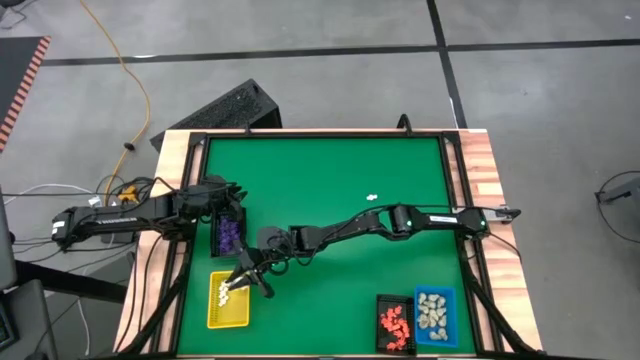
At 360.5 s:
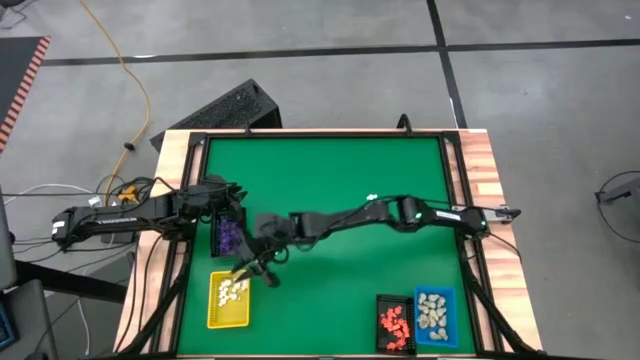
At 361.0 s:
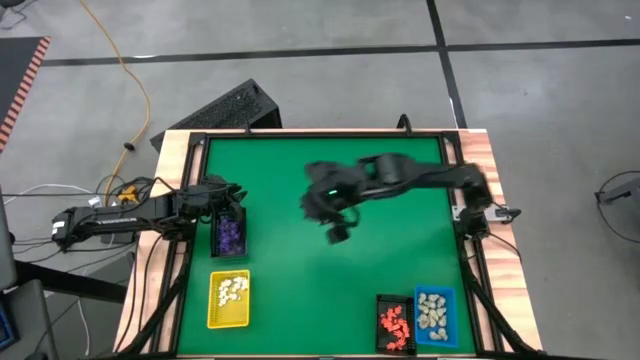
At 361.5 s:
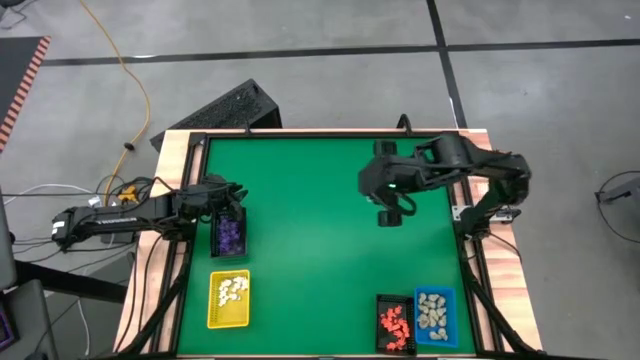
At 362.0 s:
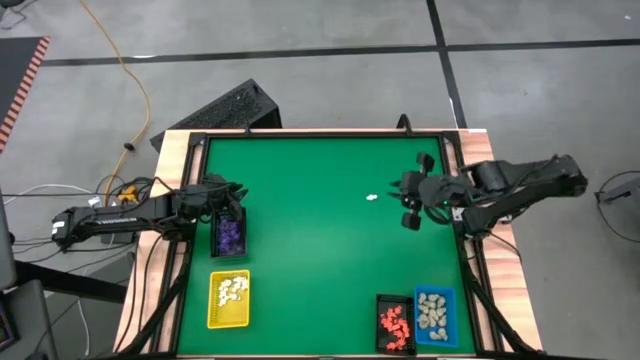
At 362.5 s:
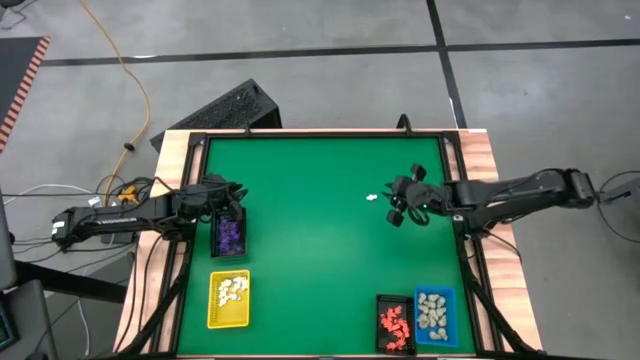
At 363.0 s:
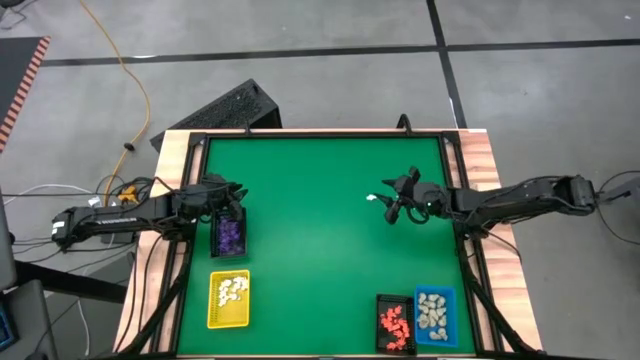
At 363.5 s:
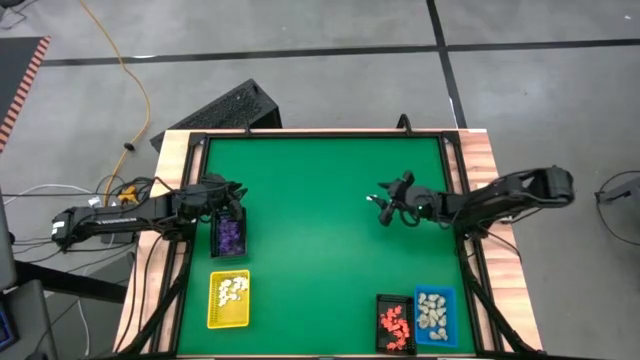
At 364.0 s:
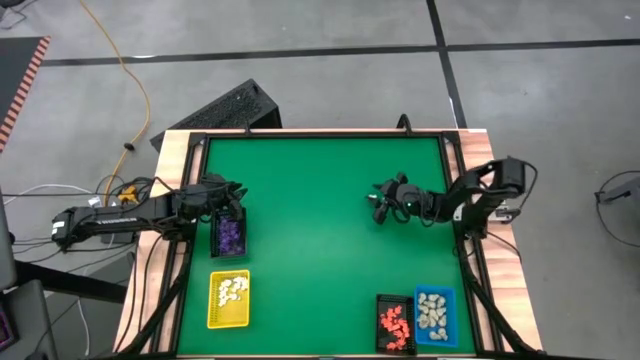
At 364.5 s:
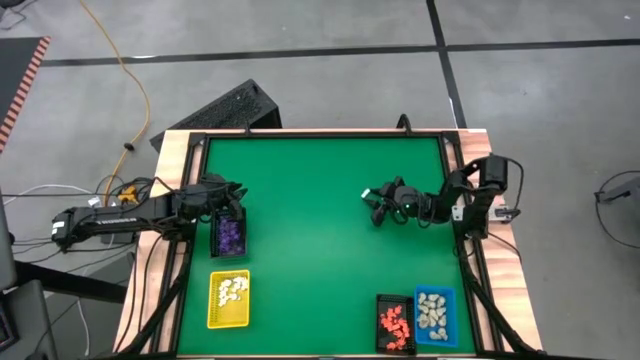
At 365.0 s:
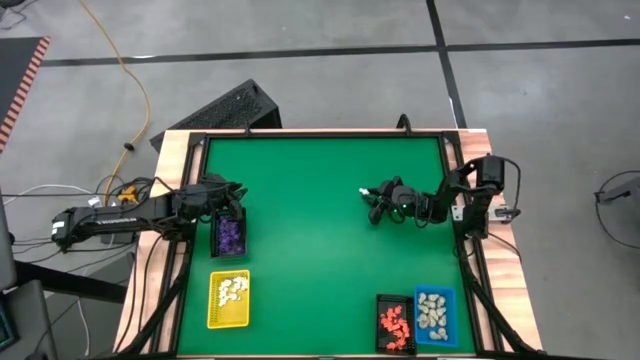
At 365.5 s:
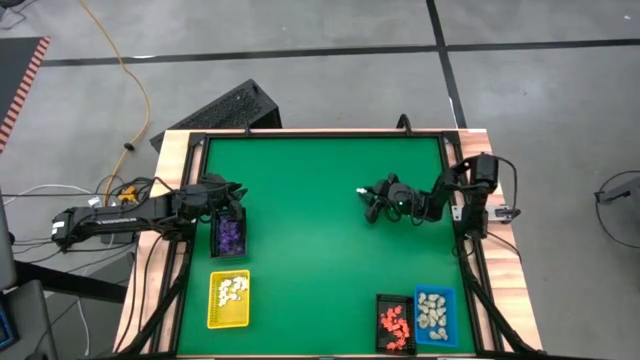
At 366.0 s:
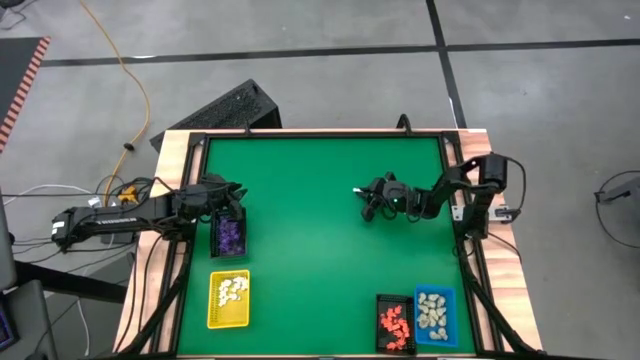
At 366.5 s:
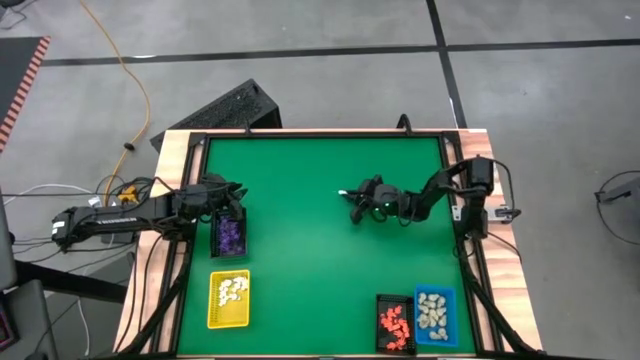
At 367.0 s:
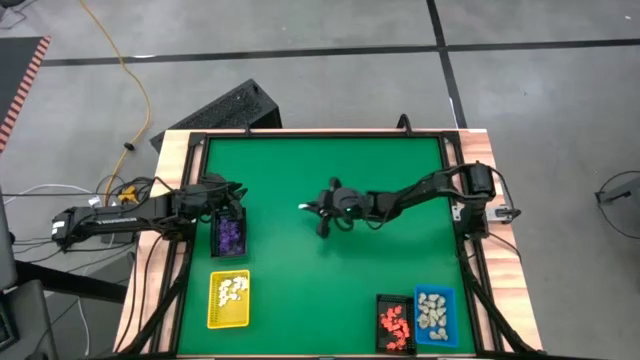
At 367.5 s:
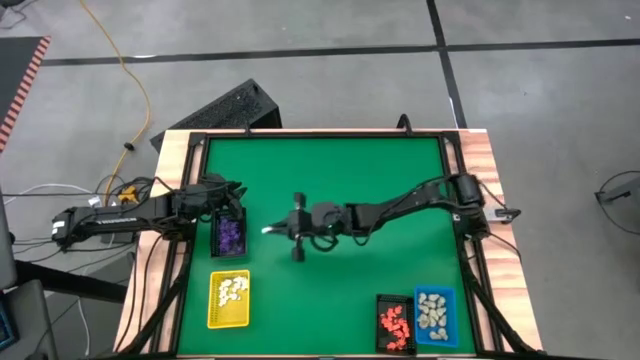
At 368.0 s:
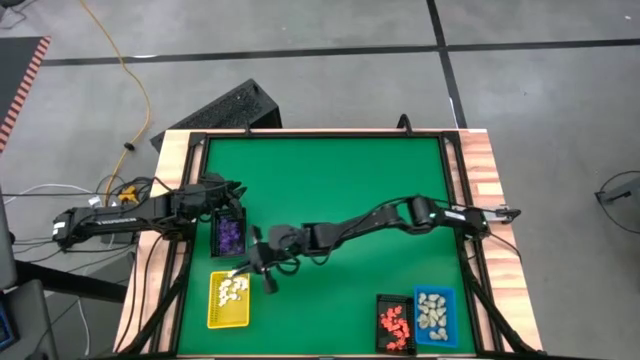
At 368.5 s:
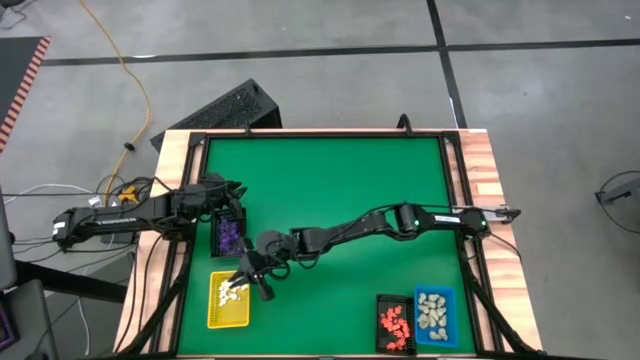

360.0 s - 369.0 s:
Task: Sort Halloween decoration
Put the white skeleton toy into the yellow basket

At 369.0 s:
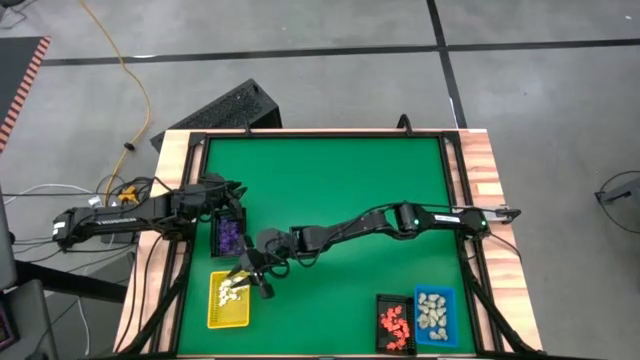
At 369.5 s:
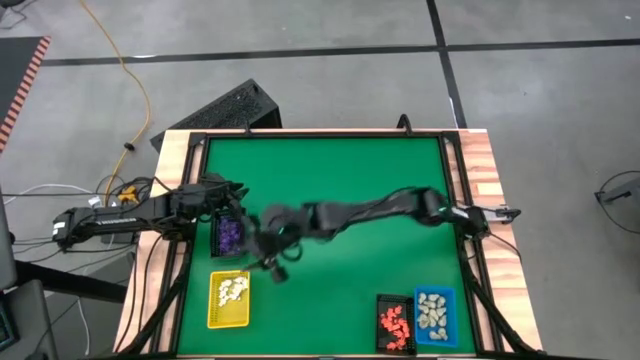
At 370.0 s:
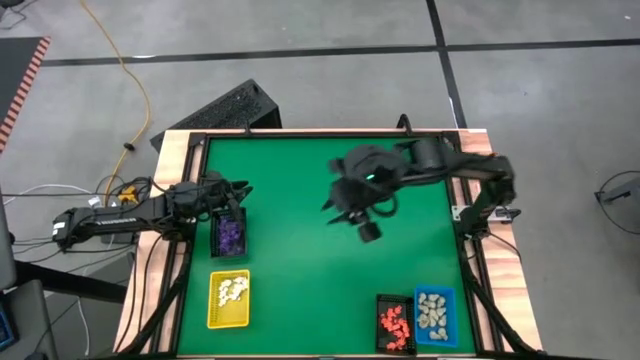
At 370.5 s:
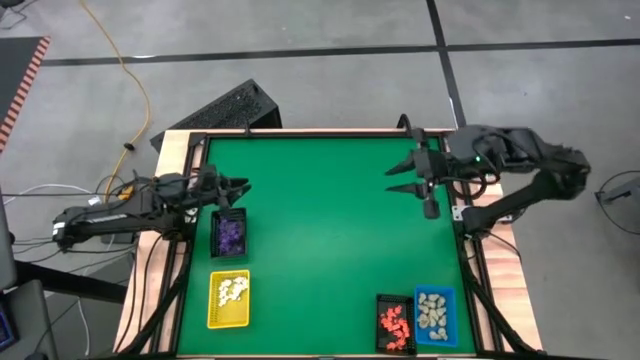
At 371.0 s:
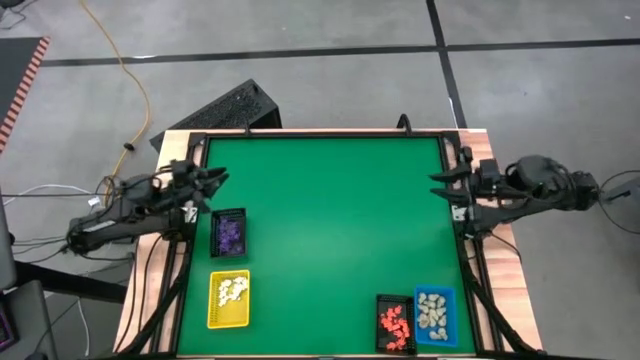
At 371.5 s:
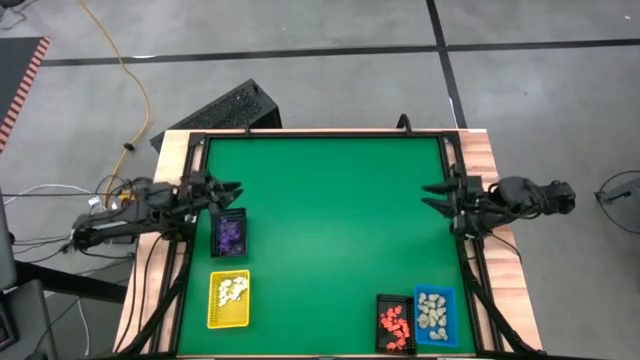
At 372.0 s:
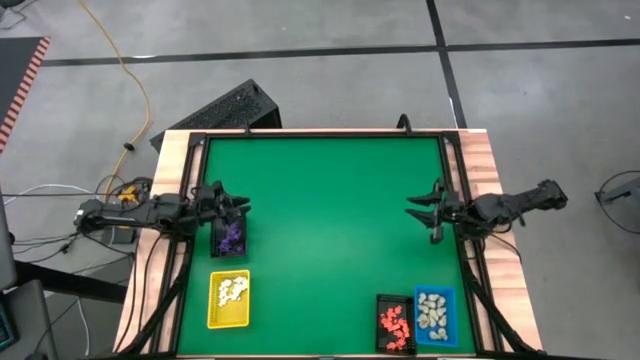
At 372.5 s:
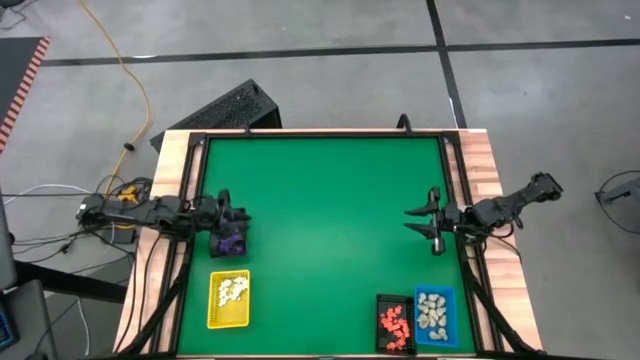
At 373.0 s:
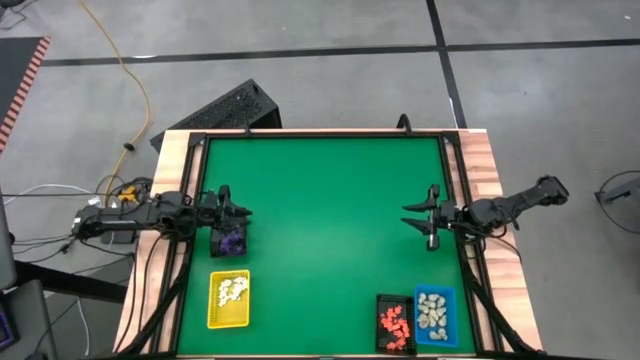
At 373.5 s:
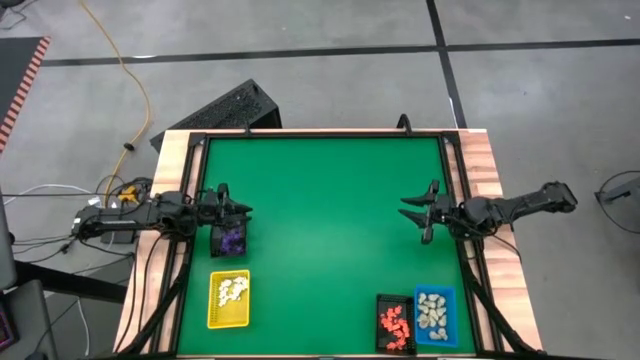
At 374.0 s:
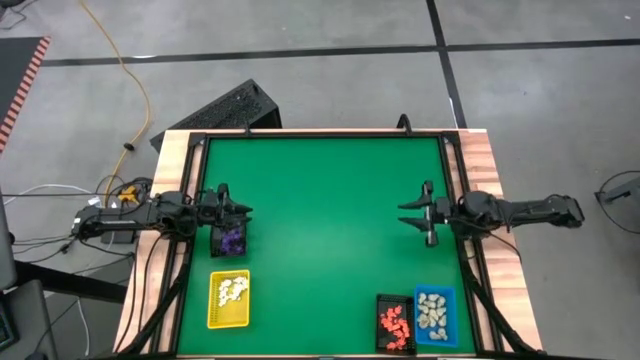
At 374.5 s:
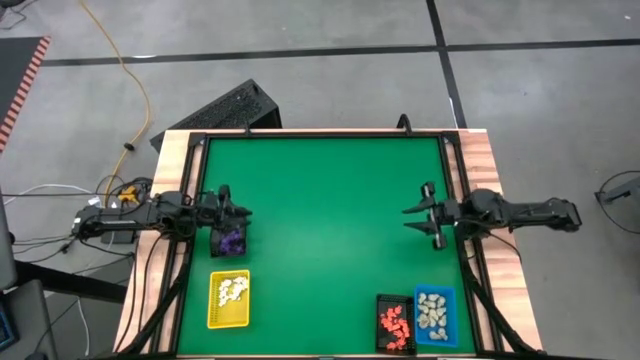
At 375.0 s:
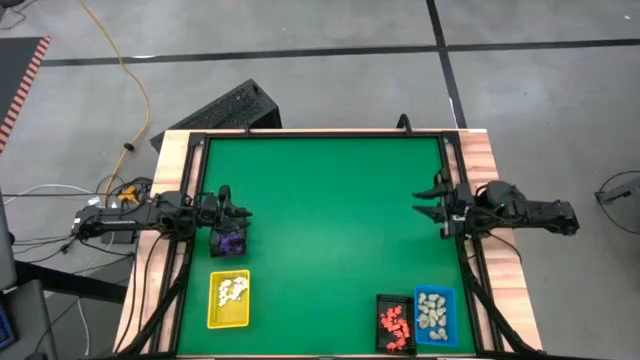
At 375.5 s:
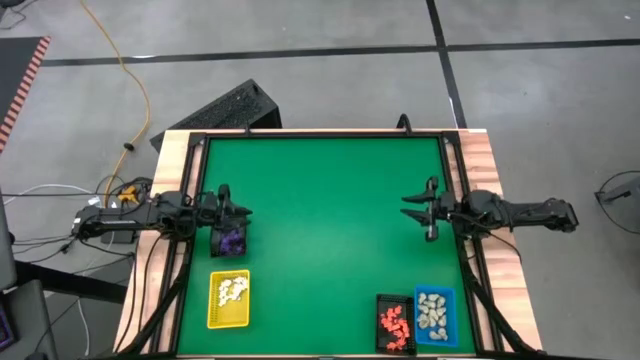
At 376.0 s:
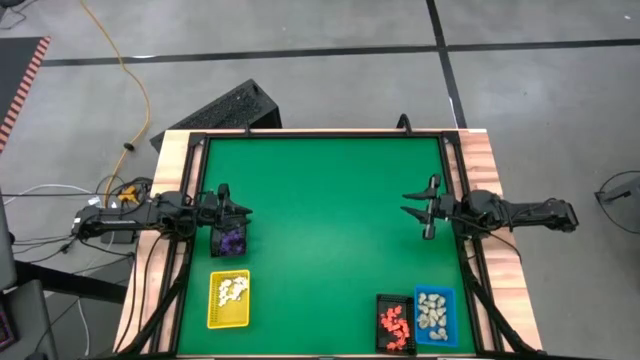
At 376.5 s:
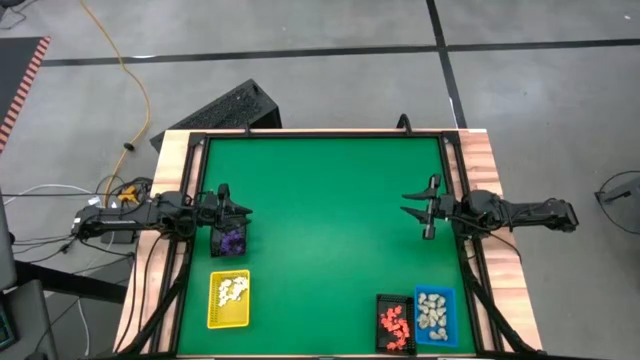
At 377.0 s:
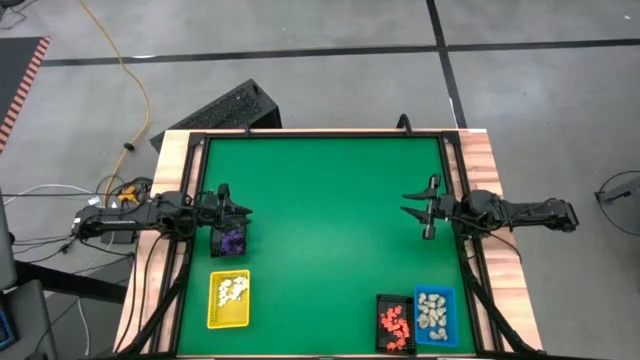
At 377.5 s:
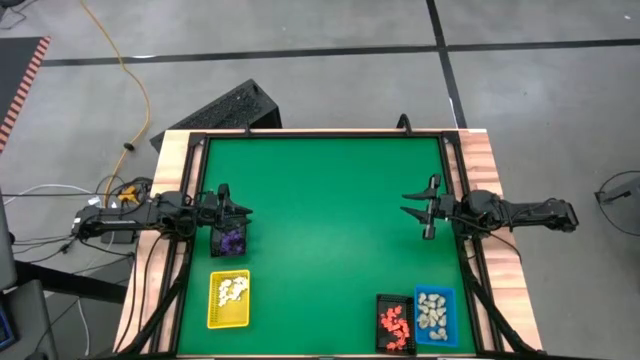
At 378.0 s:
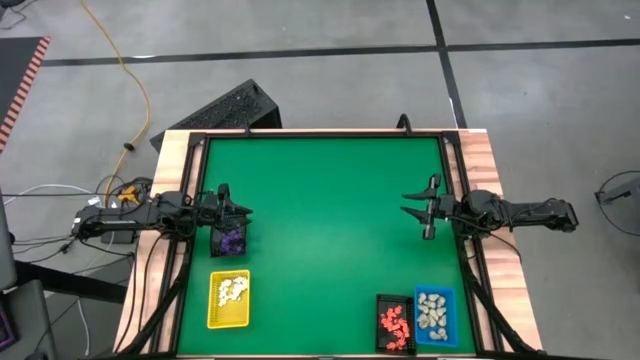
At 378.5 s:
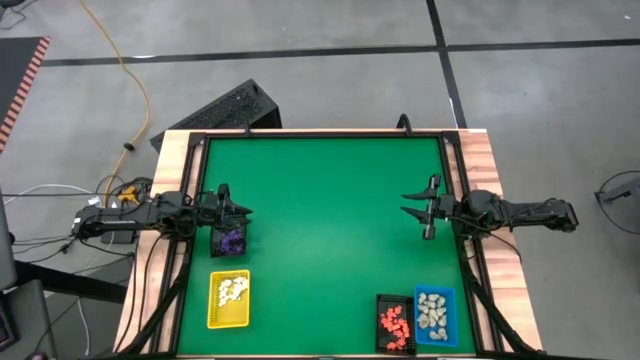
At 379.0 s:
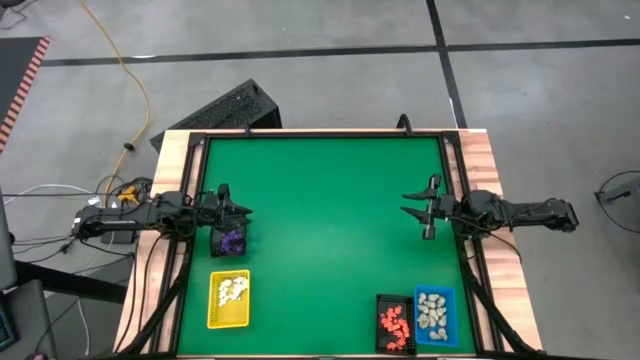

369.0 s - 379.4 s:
Return to Home Position

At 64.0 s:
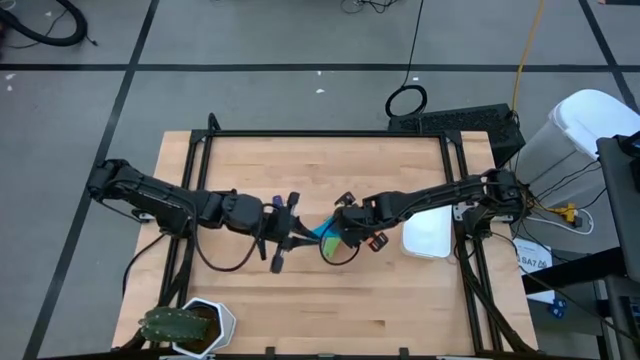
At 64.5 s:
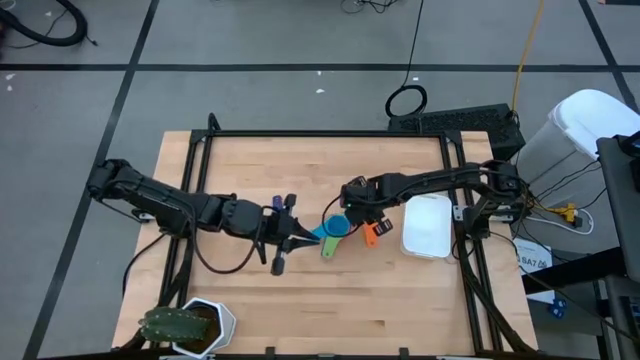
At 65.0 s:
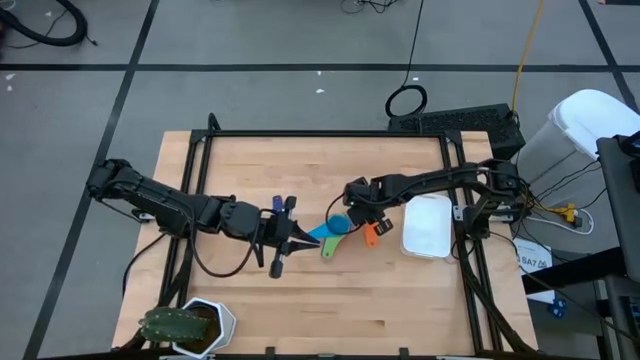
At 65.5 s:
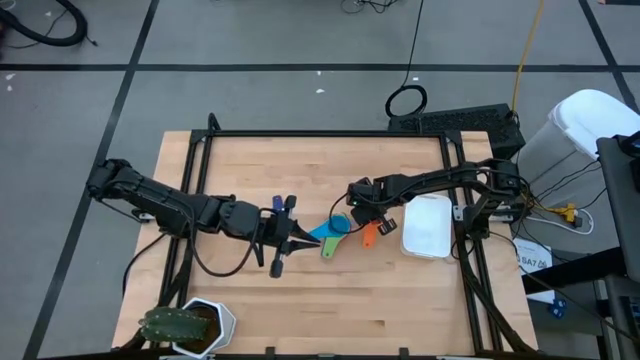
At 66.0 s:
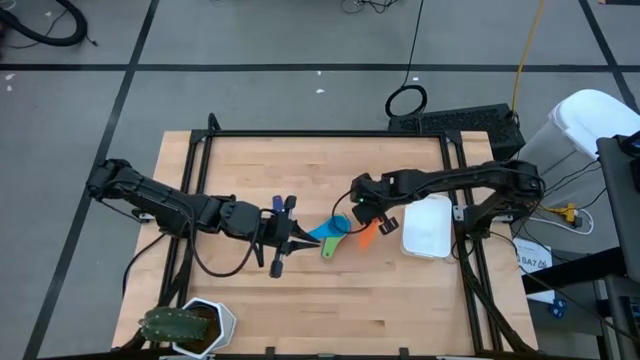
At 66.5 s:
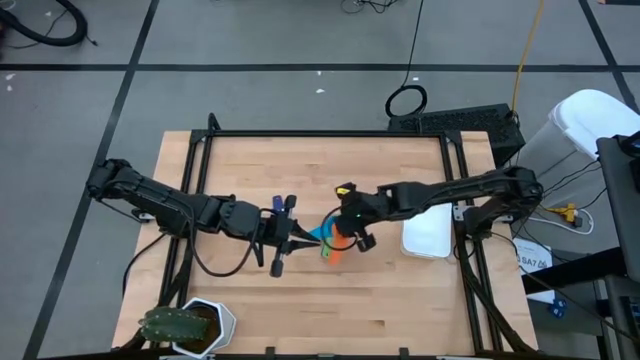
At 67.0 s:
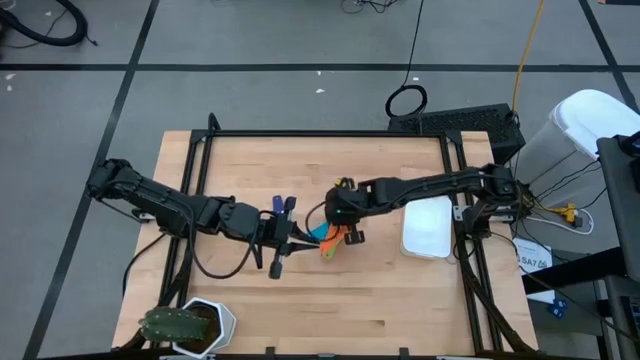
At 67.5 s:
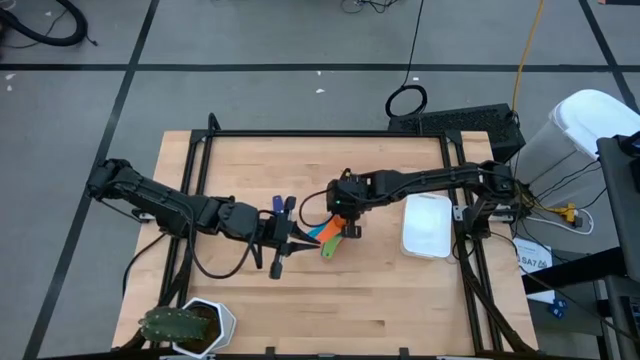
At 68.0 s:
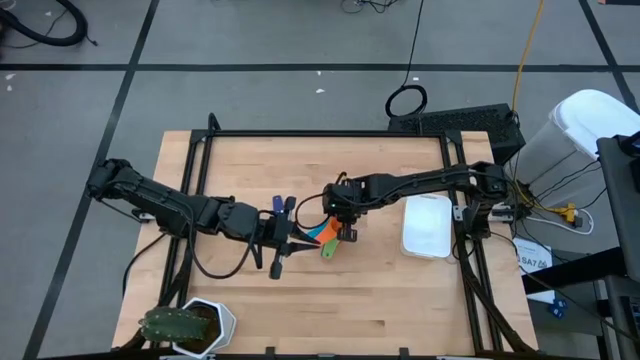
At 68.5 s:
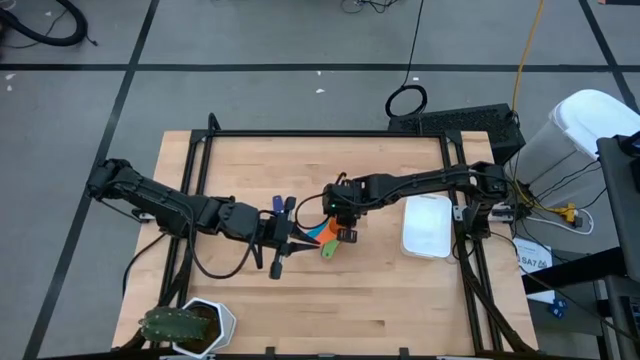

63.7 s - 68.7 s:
Task: Nest measuring cups in basket
Stack the orange measuring cup on top of the light blue measuring cup
